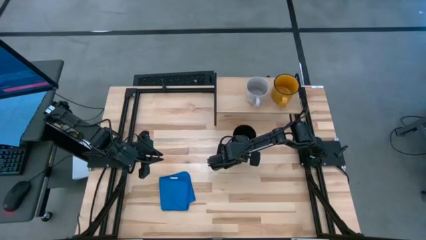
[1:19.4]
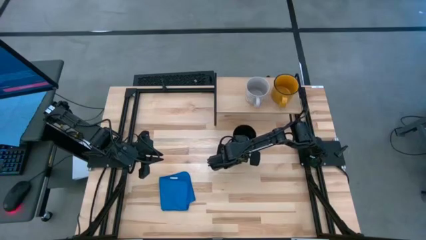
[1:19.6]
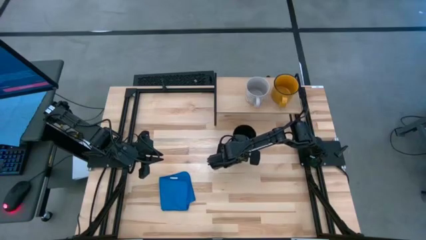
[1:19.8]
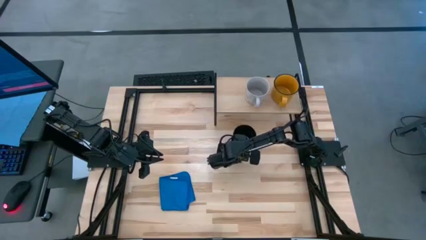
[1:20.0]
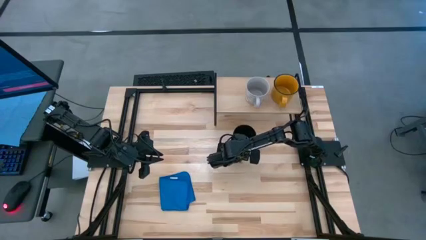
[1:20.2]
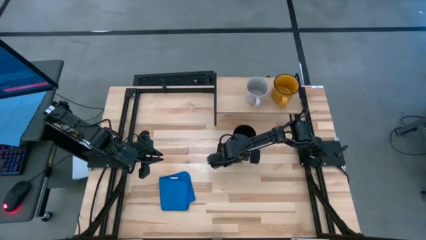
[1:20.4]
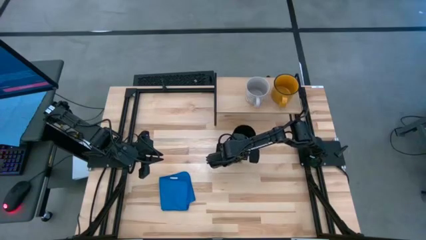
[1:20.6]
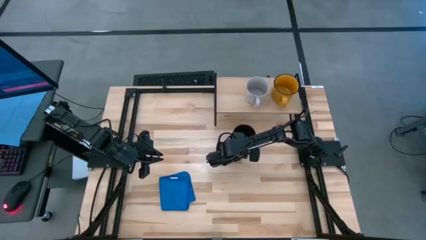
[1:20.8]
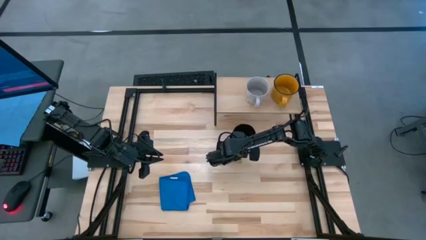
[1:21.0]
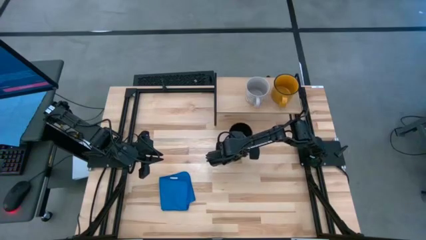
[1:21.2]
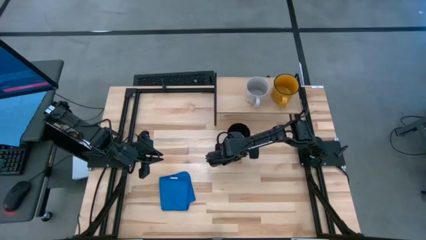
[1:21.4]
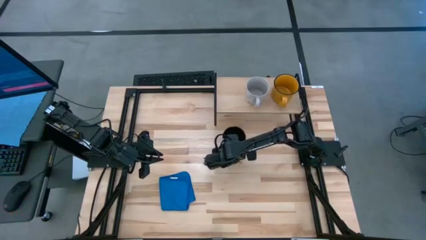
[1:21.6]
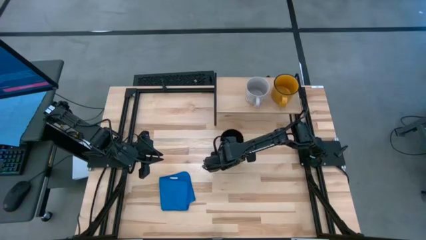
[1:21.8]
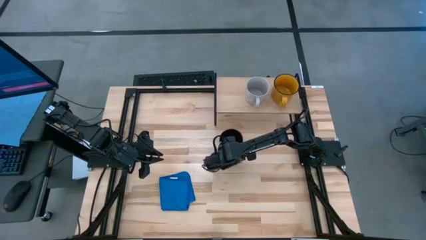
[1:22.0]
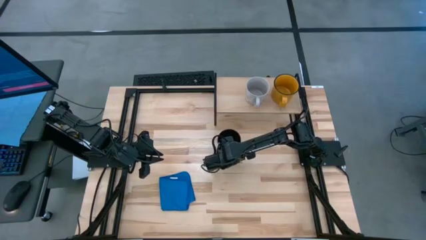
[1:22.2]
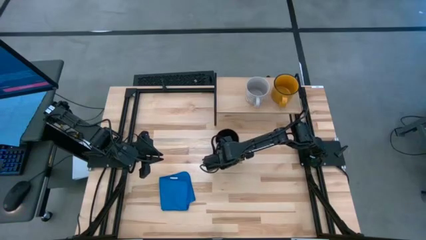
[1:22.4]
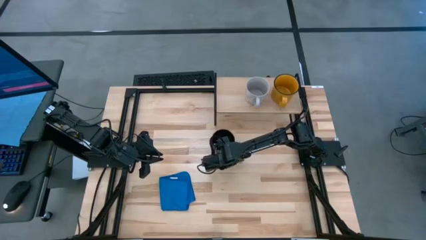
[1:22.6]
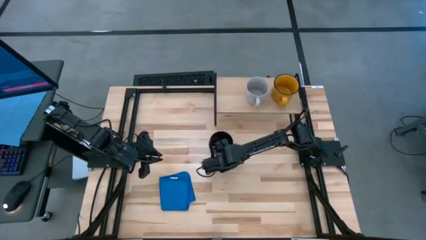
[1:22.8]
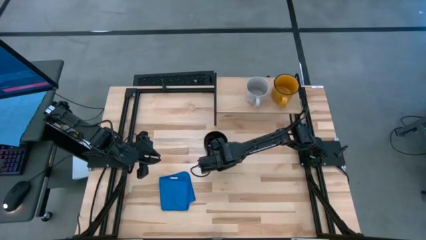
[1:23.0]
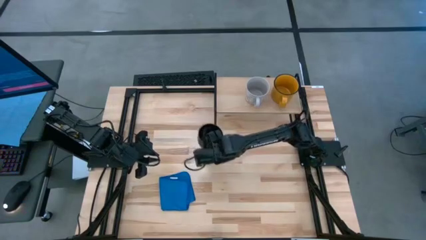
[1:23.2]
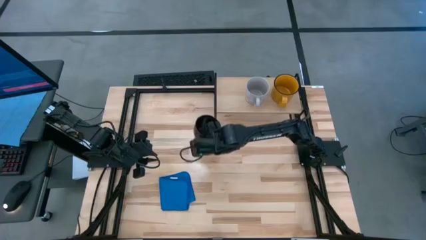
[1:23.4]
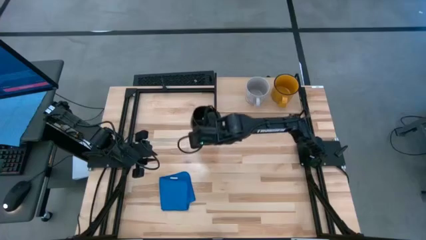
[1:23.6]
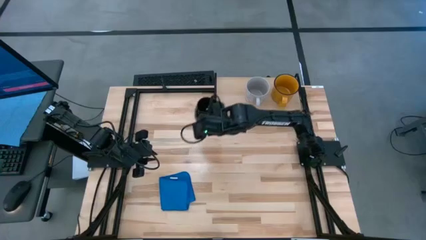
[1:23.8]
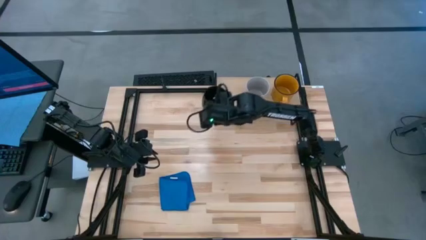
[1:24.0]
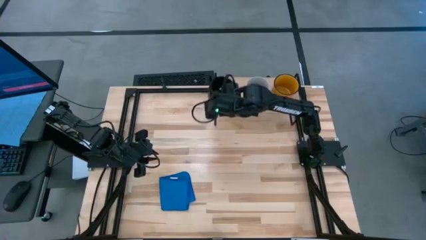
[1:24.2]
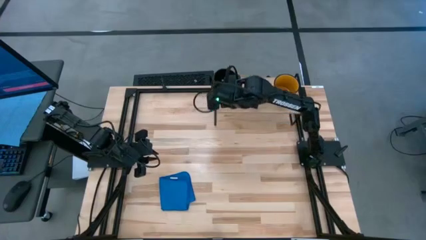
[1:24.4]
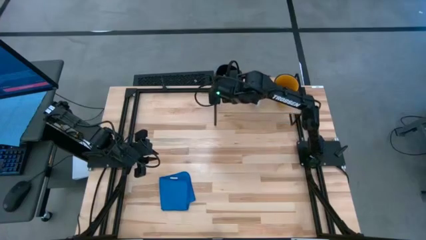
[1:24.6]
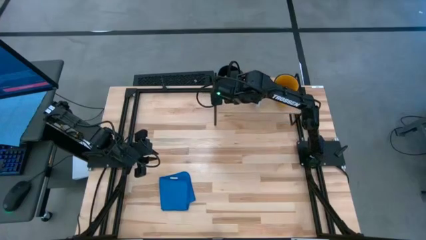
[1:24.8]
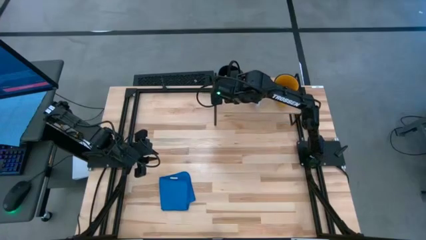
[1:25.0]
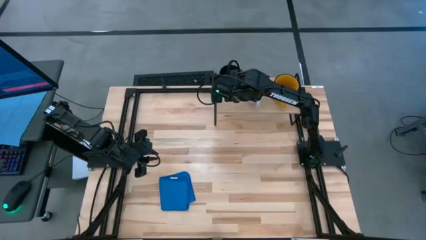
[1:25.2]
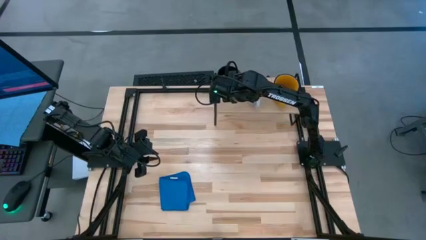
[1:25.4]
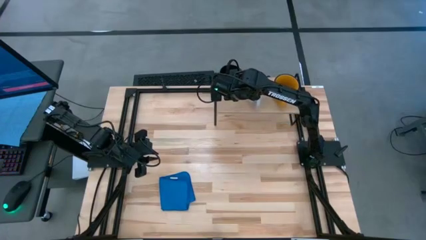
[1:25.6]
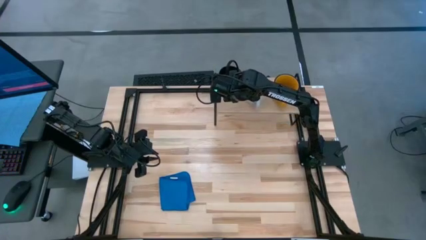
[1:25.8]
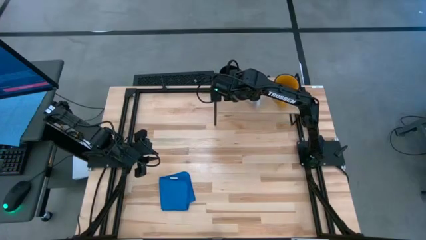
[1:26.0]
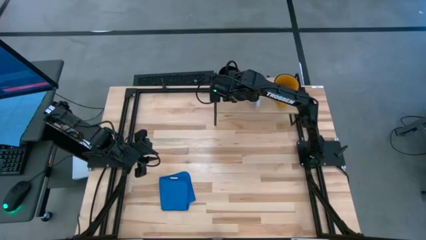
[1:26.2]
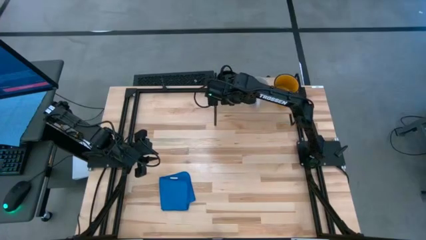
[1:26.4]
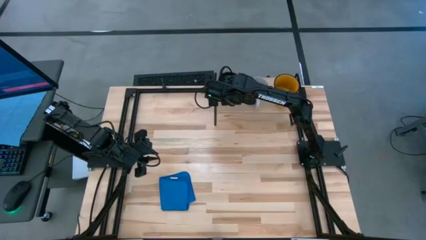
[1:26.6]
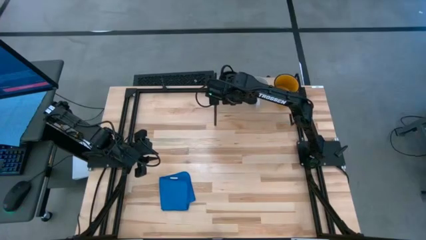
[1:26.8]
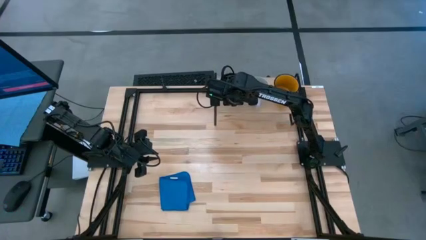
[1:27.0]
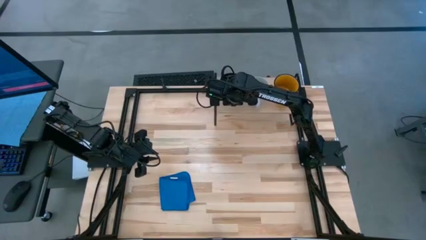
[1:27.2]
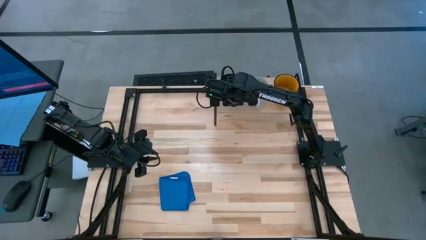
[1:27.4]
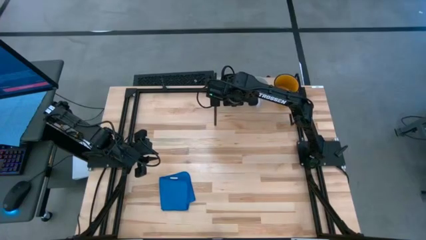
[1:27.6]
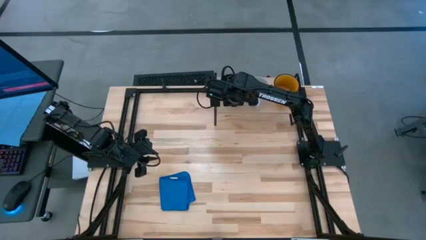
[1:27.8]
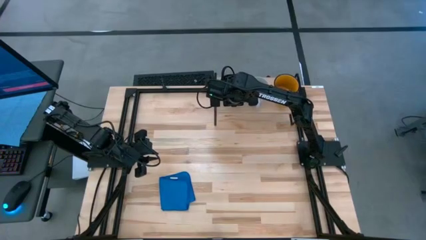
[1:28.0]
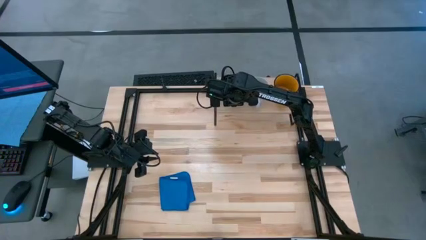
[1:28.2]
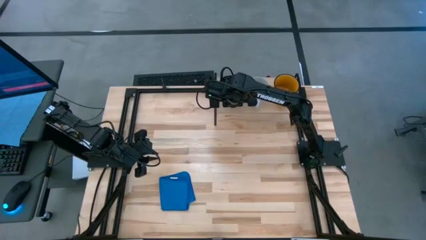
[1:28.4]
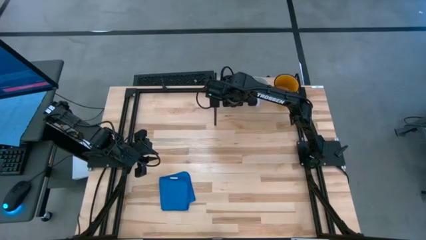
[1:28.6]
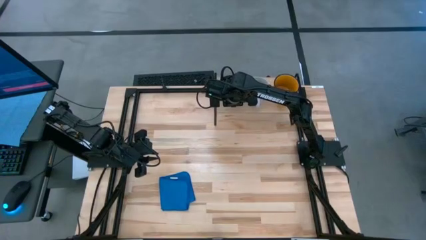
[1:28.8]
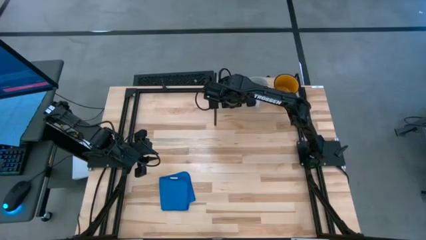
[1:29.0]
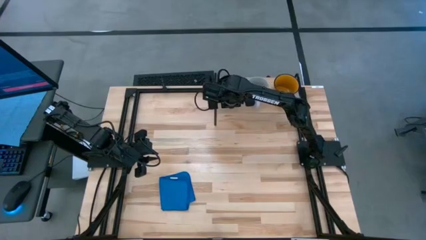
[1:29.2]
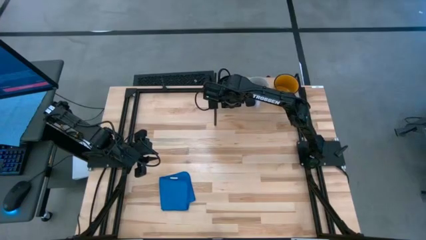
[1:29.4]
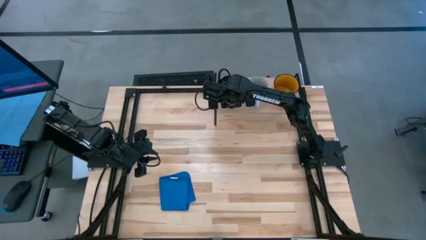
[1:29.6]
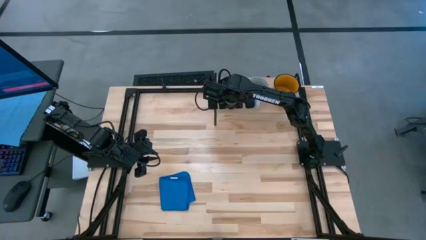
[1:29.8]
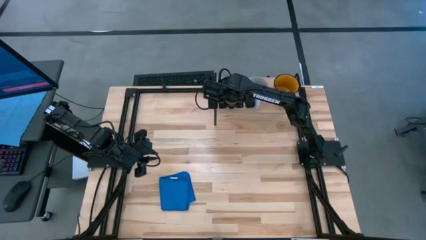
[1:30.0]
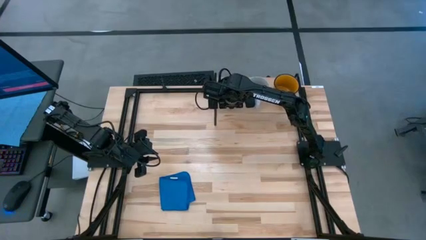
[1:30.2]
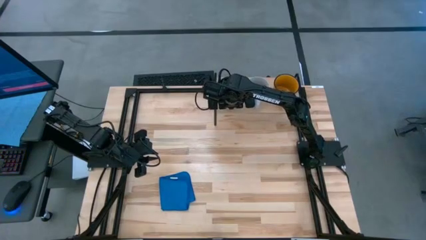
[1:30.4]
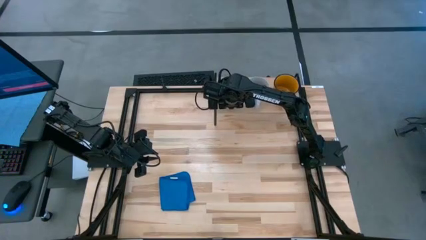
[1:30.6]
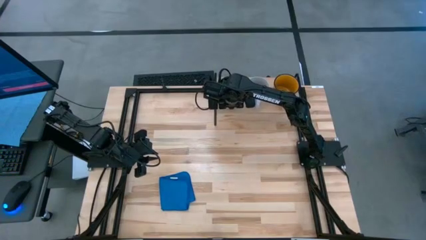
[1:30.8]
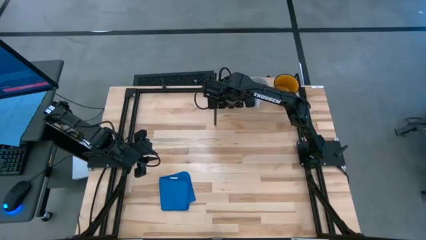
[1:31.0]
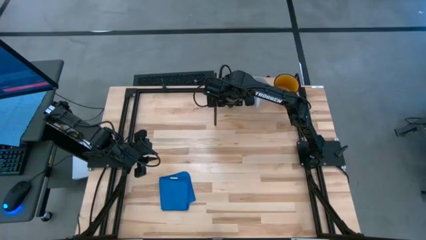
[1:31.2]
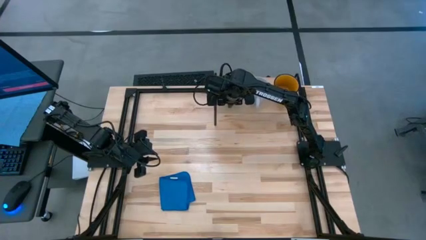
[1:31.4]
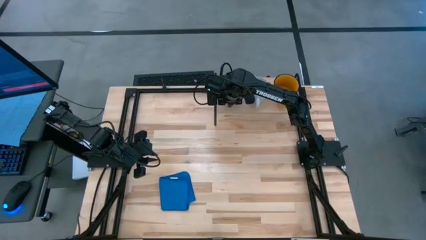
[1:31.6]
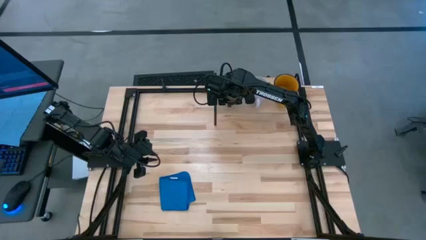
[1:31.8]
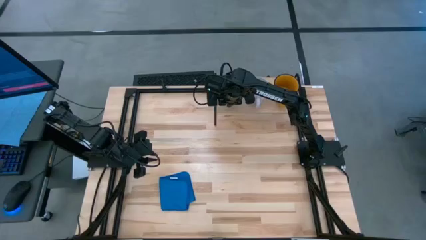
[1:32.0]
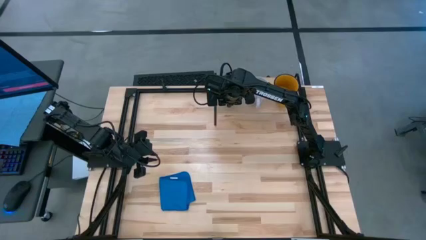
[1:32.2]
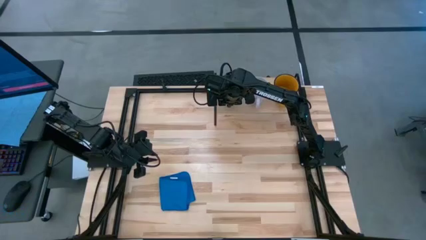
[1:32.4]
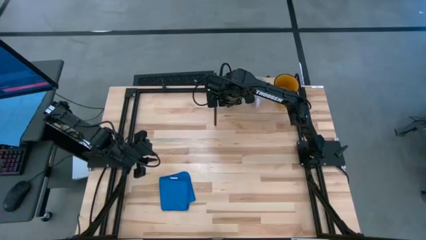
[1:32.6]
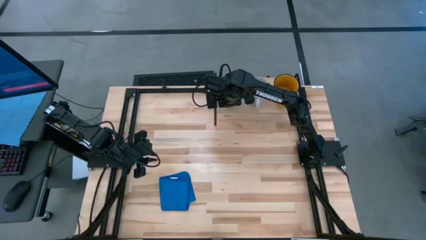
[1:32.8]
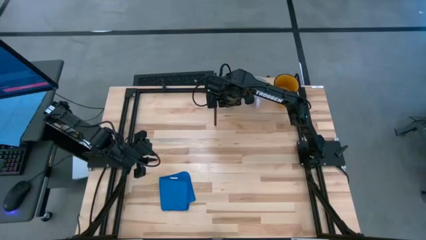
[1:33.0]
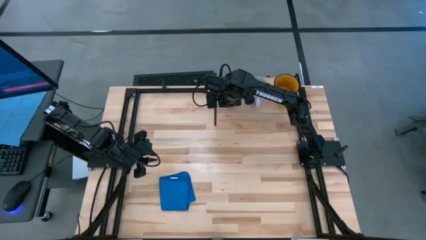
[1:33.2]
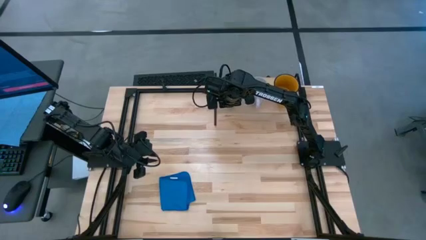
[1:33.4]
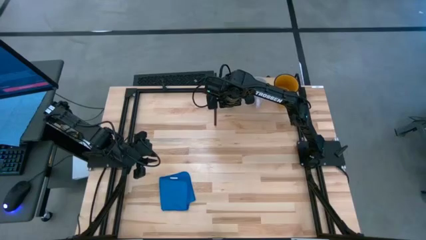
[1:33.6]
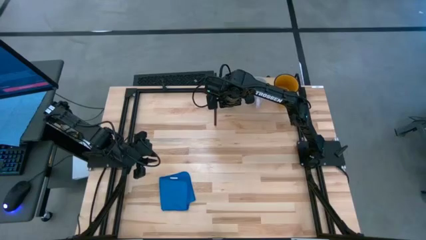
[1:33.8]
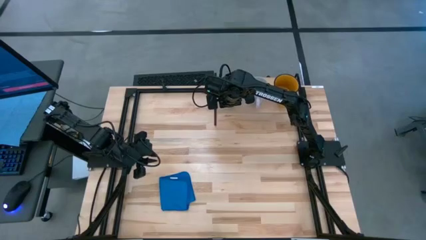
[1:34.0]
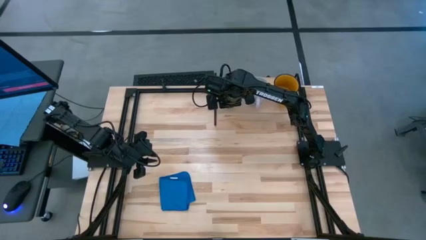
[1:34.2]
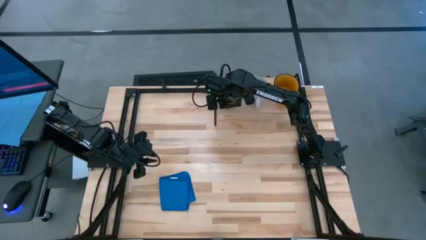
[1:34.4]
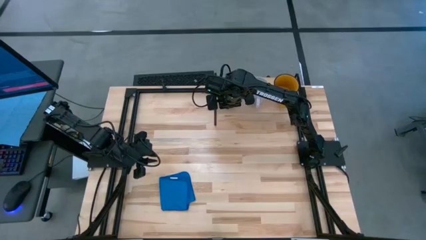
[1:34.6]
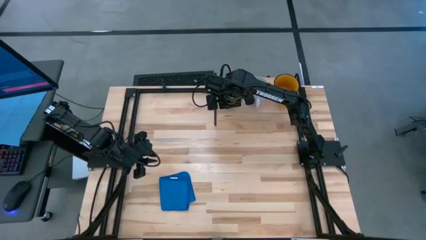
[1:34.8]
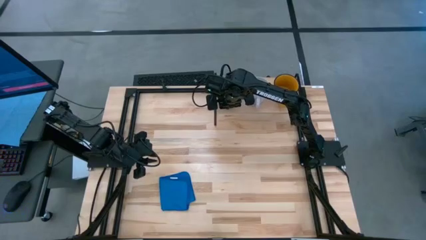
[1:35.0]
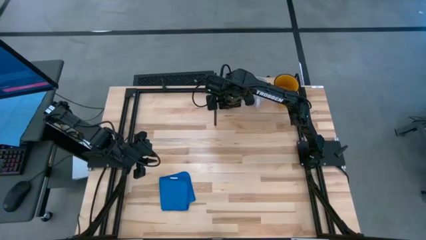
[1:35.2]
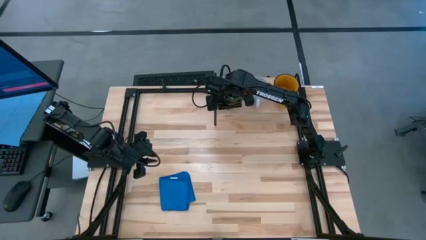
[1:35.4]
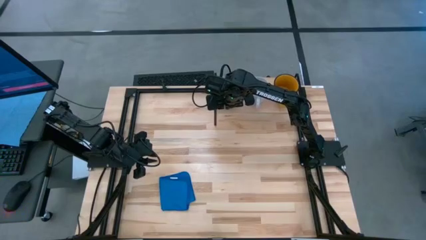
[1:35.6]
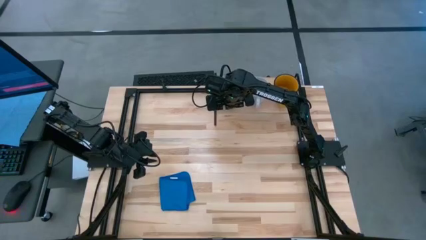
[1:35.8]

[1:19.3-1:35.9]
Task: Stack small to large cups/mugs on shelf
Put the black mug on the shelf
